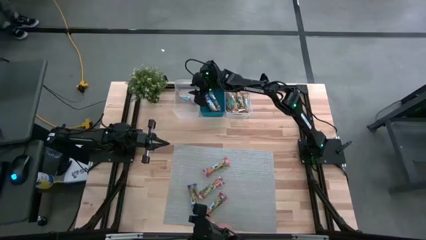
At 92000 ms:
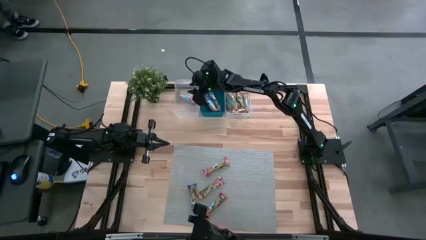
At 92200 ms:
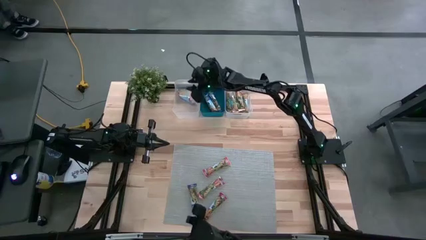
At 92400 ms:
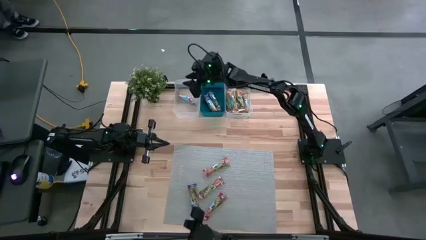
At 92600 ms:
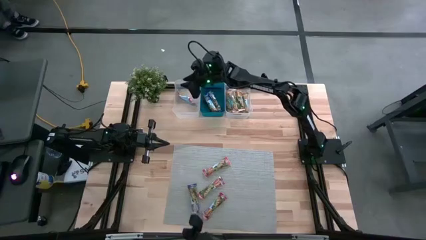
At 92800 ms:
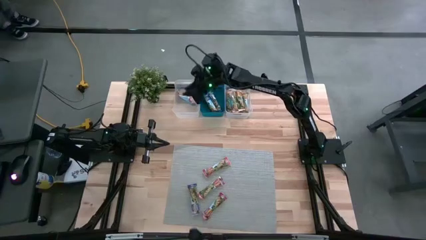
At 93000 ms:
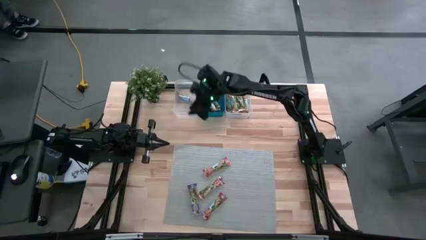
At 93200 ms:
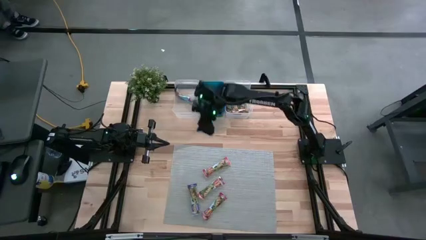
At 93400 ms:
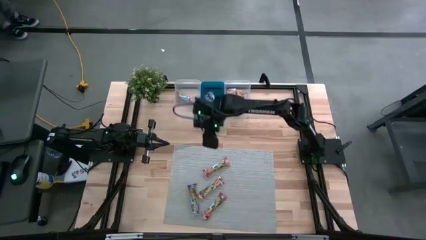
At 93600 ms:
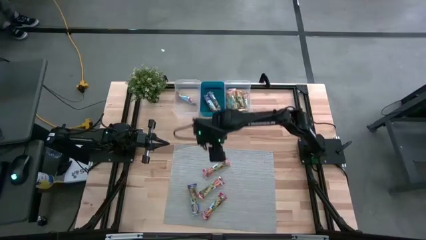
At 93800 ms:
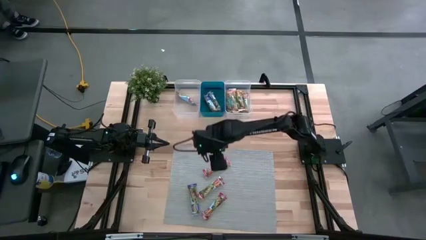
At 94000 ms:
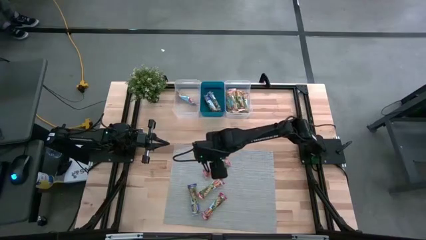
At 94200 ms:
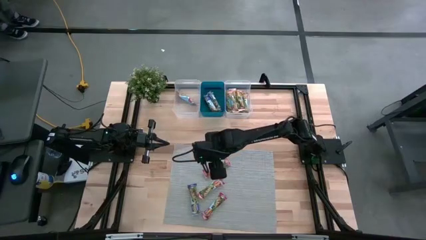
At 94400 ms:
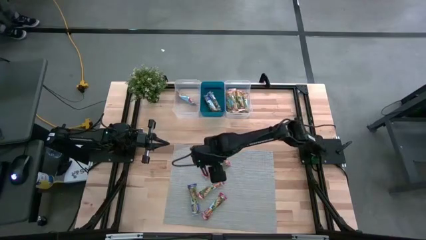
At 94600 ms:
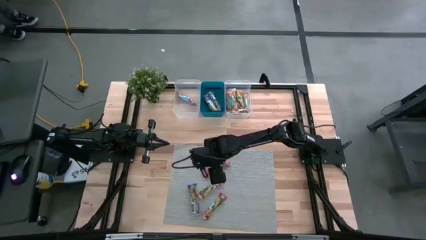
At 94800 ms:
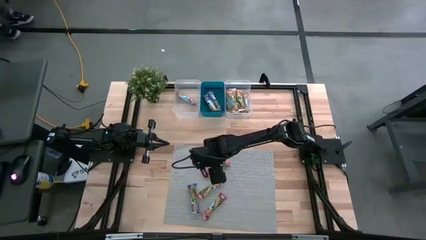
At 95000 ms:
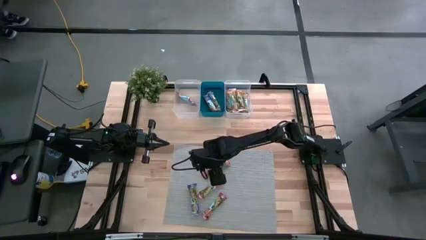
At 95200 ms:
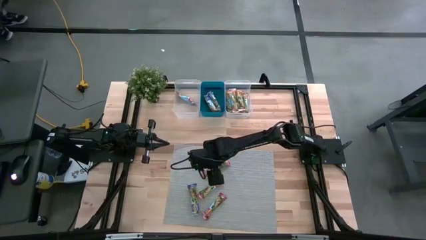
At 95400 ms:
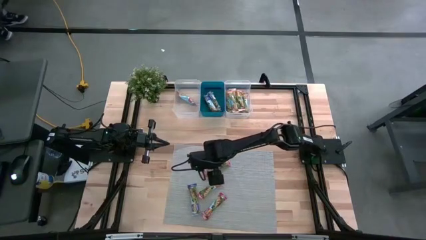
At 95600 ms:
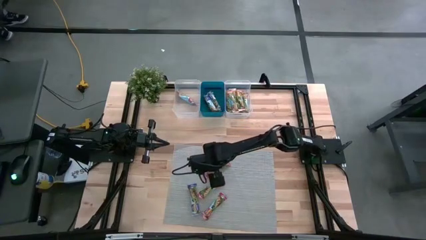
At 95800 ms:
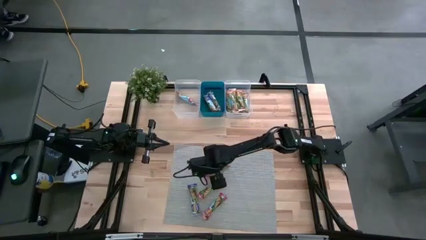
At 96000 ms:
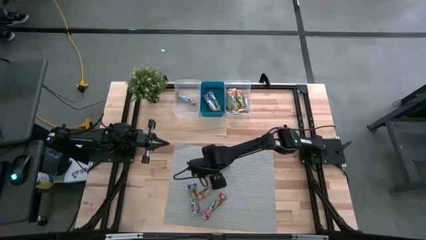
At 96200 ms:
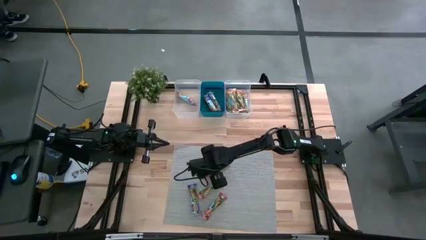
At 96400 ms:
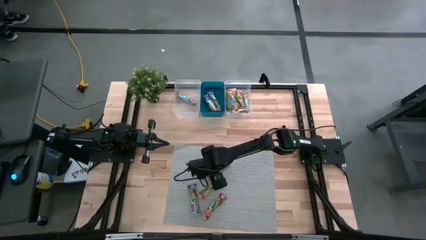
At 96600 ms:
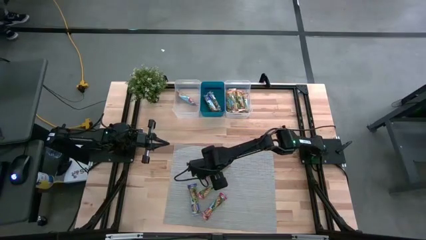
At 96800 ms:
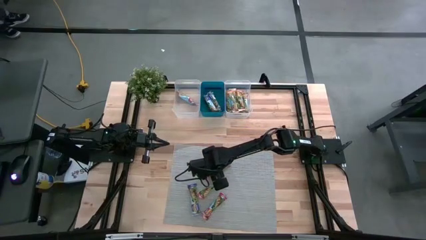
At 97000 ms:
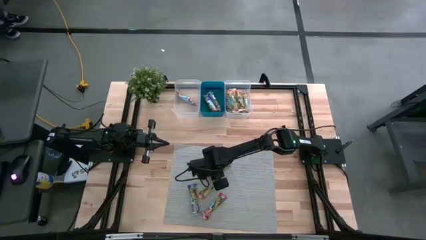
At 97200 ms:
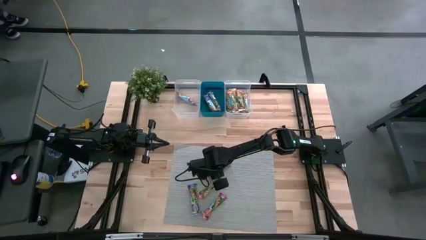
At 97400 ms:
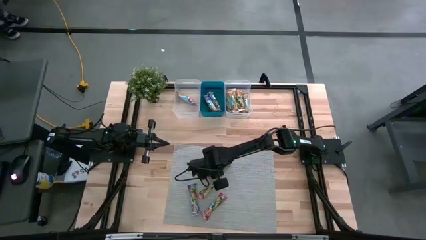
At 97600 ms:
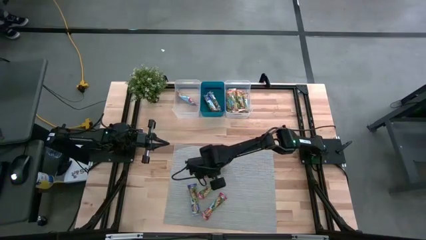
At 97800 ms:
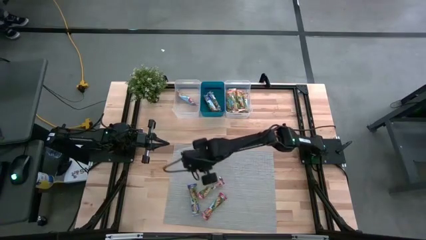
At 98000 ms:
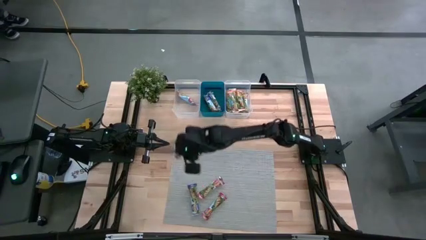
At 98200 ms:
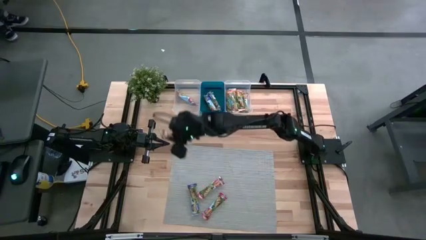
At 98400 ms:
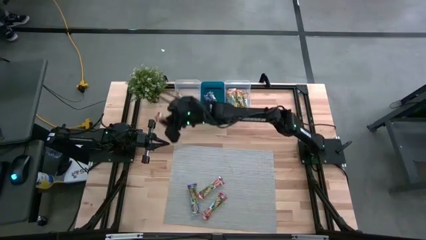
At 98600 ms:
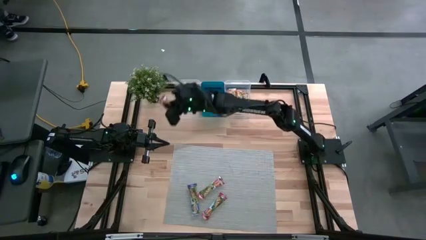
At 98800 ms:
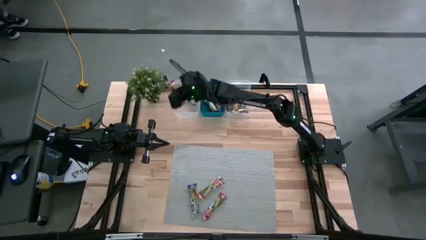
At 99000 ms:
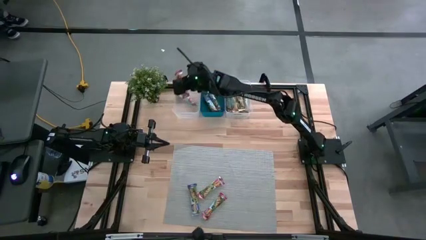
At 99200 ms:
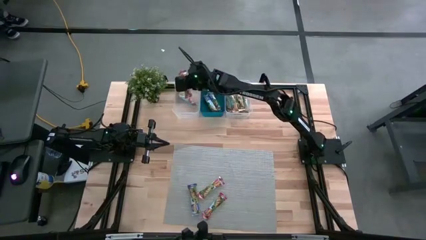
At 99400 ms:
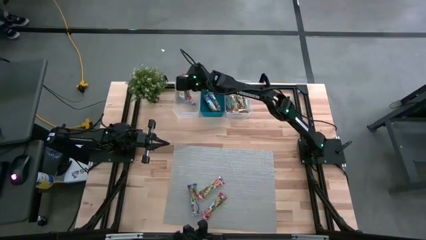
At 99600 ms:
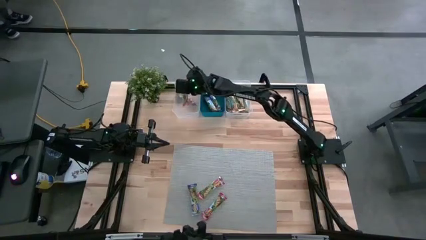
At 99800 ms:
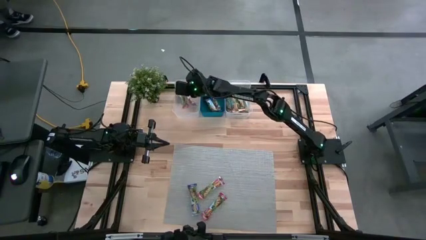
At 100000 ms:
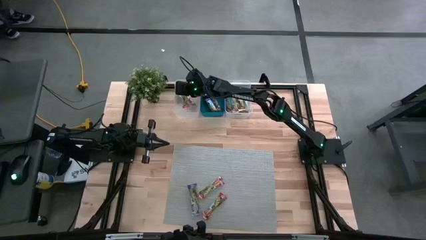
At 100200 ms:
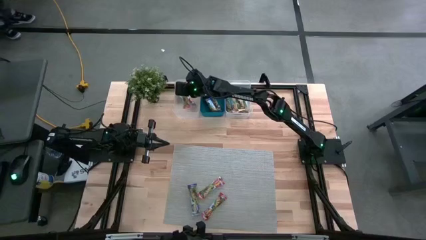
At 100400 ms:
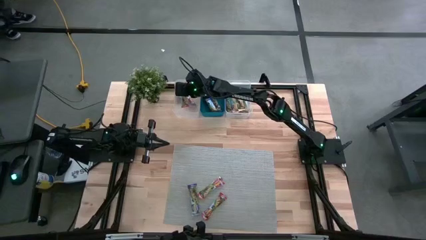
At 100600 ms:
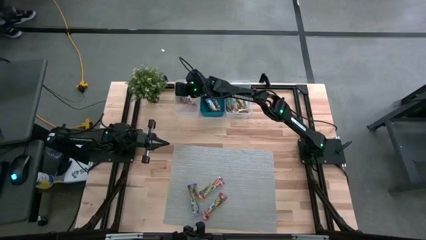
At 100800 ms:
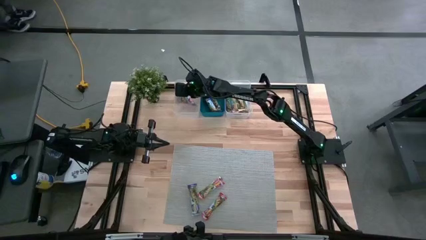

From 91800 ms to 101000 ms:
Task: Pick and place Granola Bars by type
Put the red granola bar into the left transparent bin

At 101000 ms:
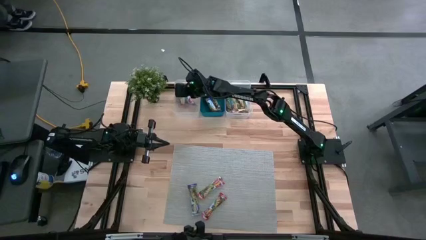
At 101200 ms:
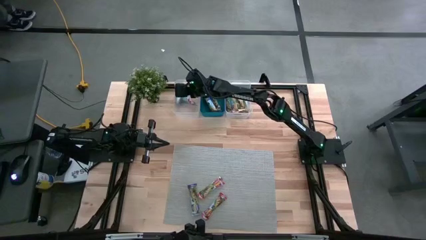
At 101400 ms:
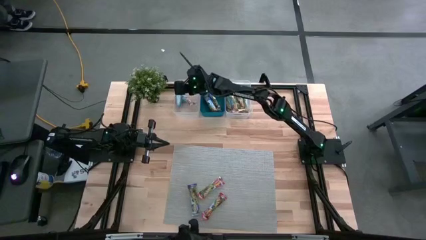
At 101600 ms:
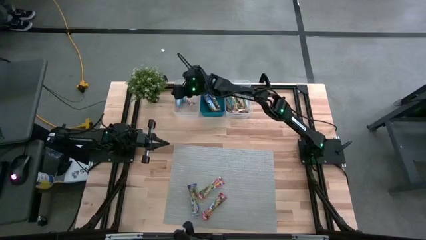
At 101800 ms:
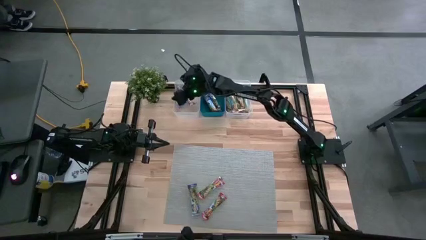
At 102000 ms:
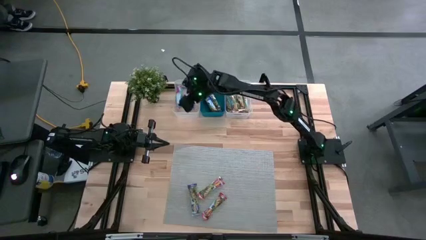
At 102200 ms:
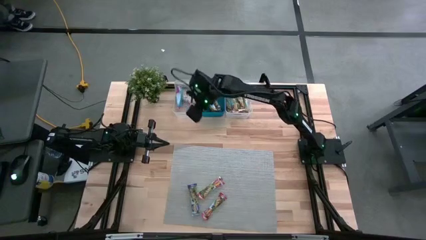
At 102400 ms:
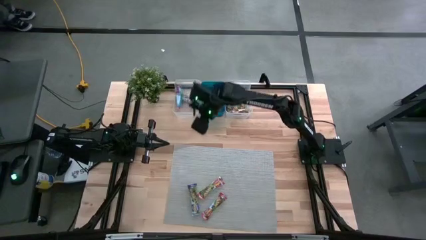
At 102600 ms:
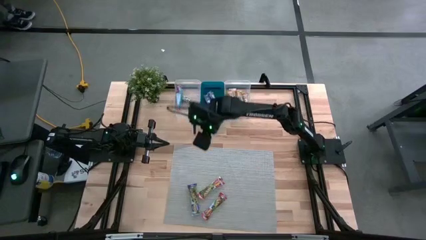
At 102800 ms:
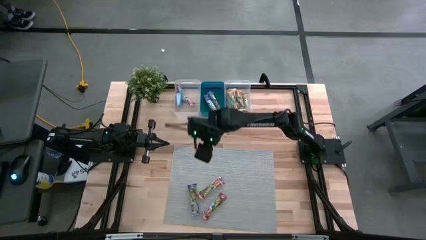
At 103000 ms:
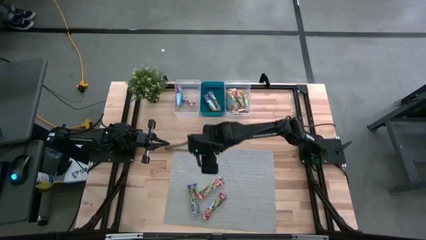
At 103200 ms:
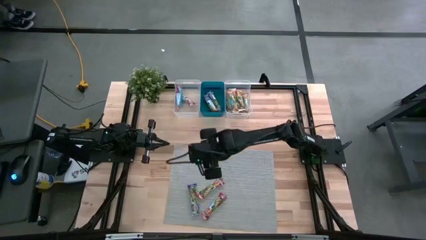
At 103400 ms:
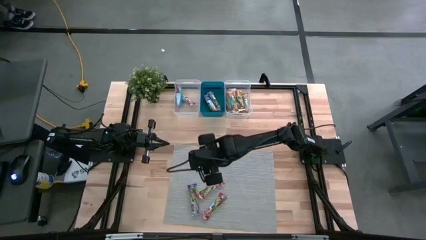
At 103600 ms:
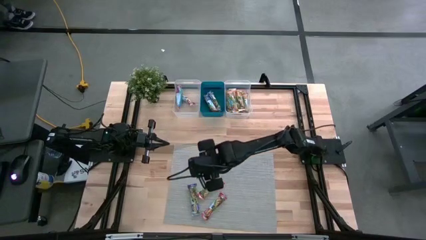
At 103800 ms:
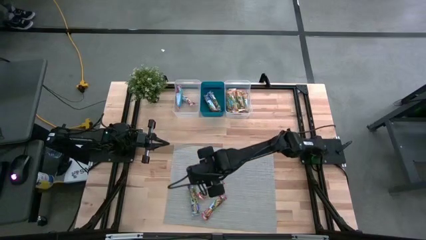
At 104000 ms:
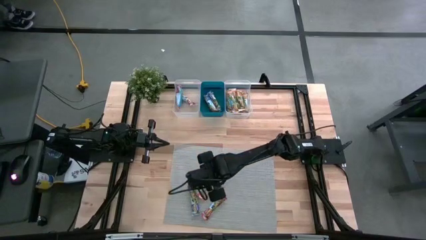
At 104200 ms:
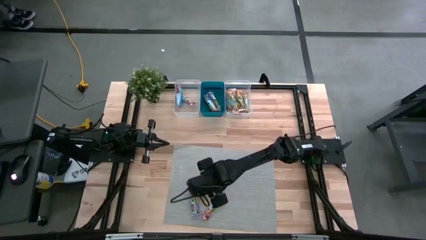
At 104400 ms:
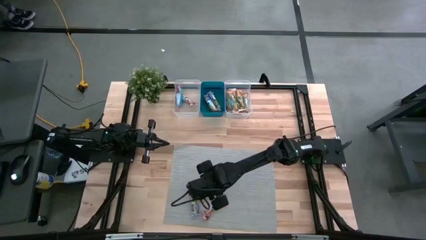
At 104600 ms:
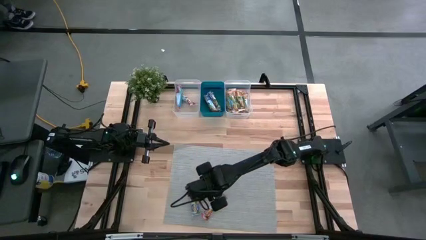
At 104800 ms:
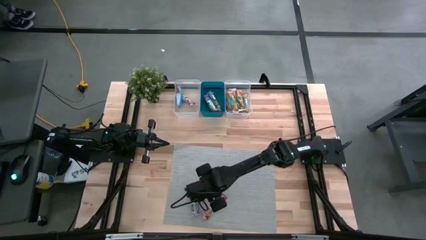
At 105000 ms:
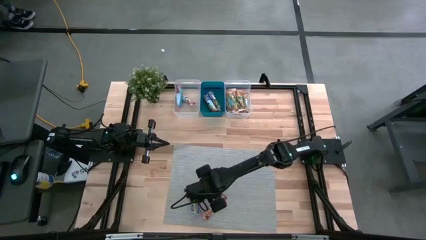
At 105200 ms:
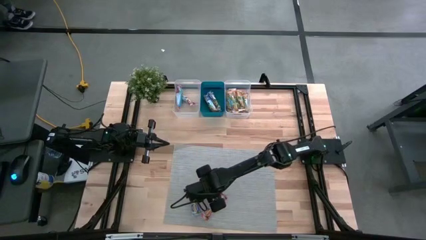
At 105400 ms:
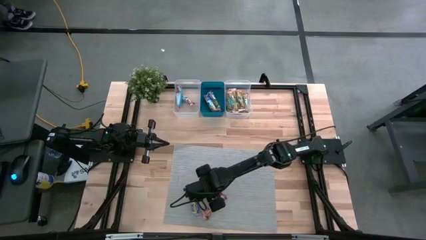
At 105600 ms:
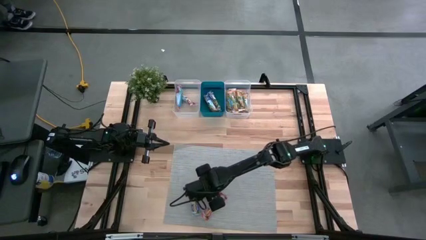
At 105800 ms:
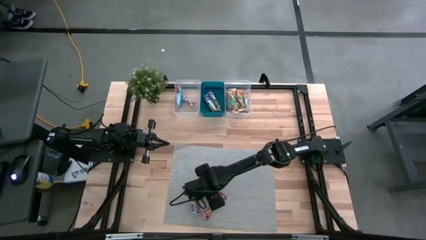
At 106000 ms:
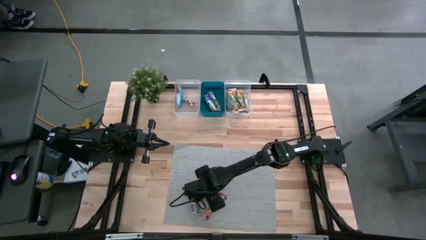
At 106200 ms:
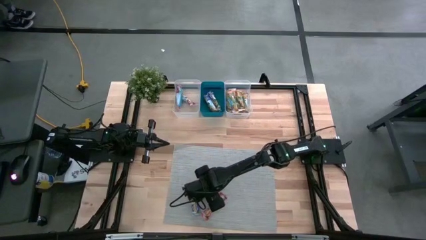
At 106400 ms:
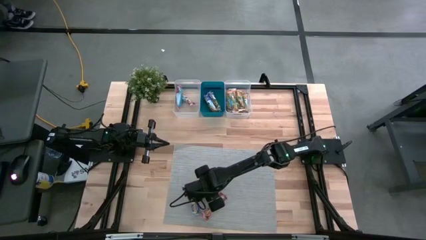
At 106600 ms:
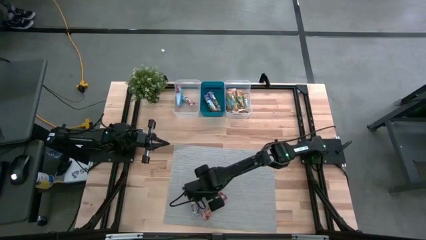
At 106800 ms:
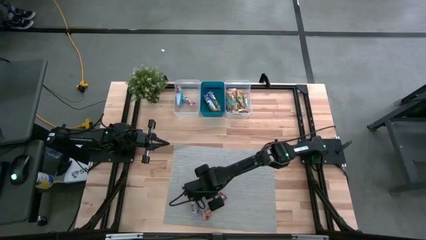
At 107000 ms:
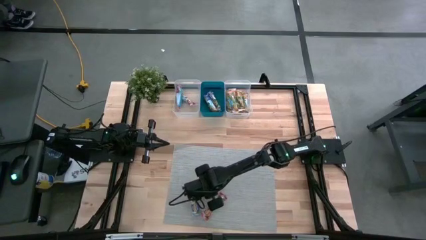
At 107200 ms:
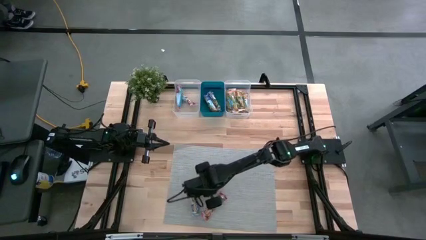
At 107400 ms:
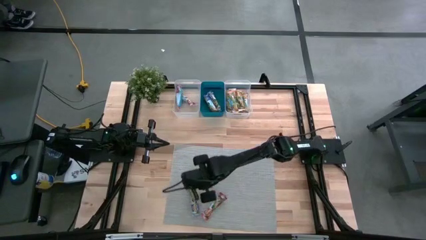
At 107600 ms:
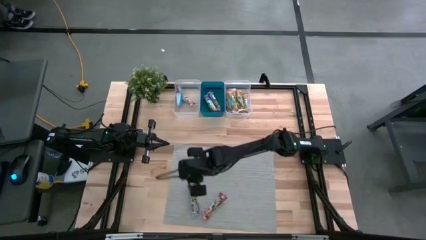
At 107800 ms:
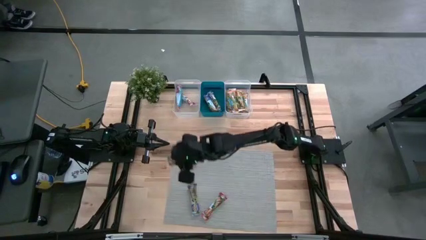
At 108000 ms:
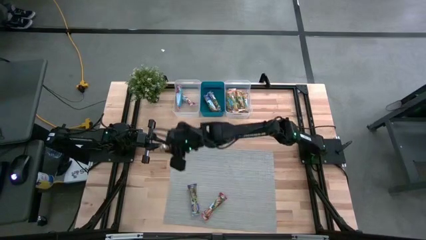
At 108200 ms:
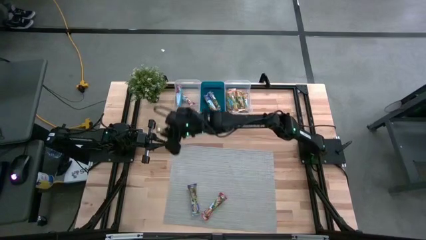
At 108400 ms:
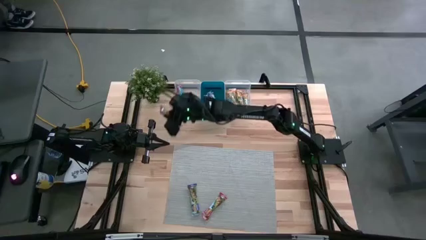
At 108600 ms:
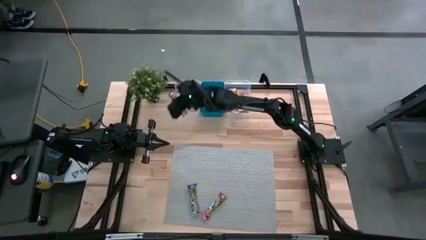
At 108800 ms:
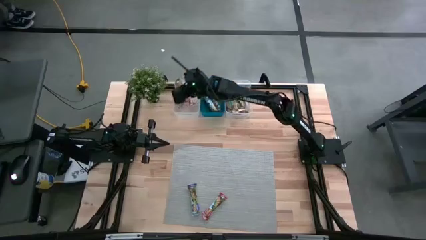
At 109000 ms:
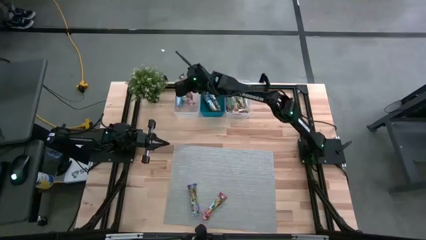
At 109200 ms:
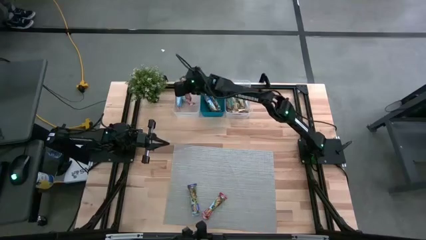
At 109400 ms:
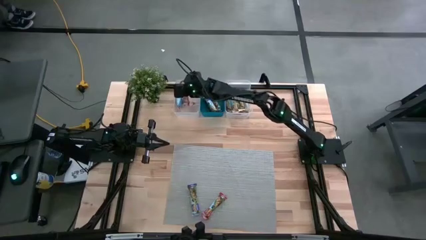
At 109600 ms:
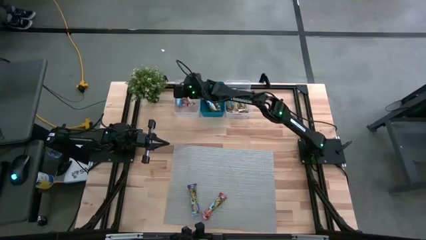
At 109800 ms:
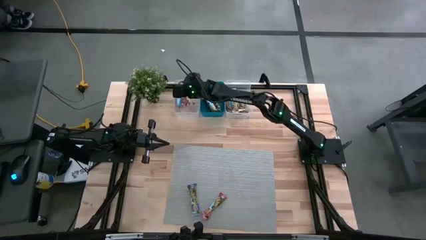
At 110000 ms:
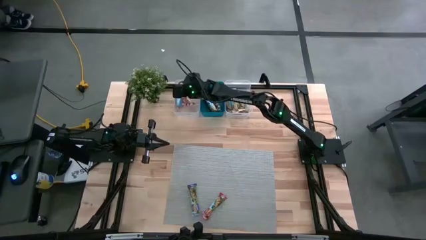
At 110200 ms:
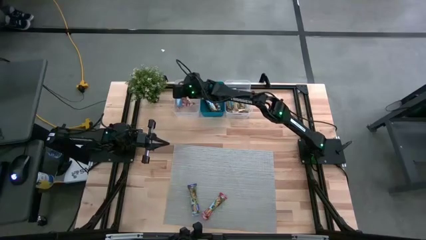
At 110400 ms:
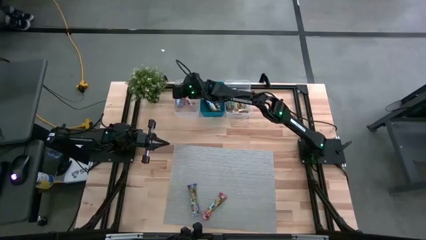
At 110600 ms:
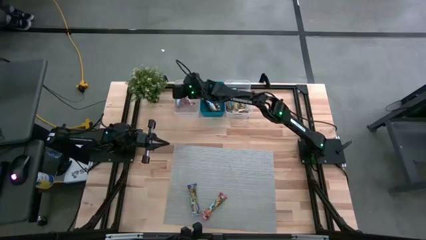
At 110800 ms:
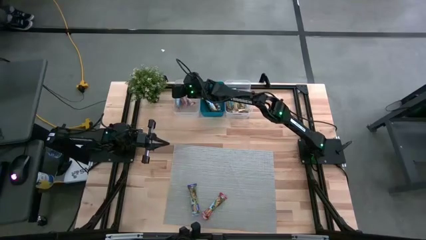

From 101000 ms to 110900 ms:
Put the red granola bar into the left transparent bin
